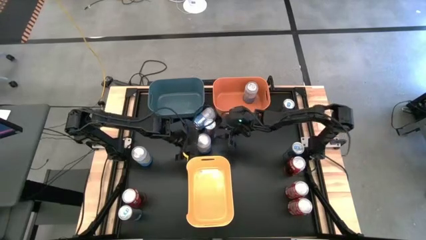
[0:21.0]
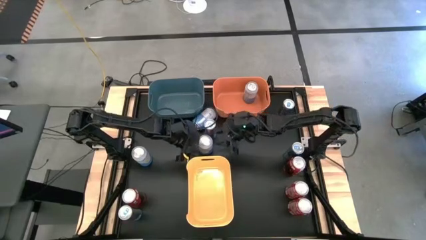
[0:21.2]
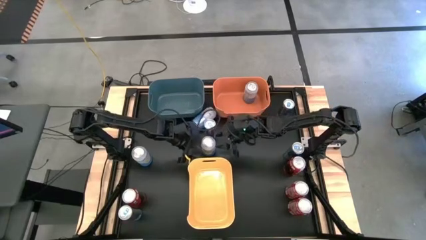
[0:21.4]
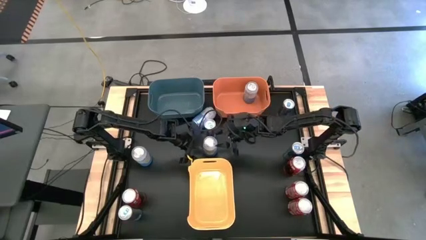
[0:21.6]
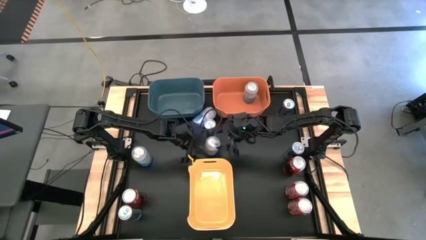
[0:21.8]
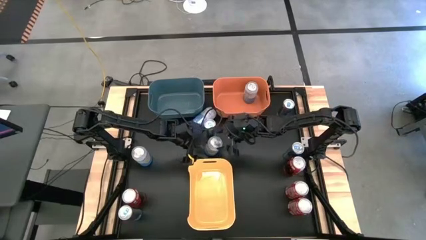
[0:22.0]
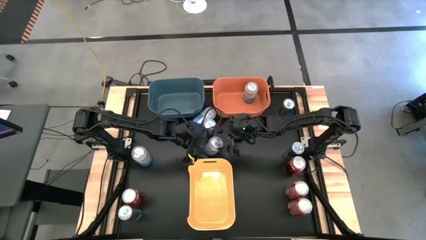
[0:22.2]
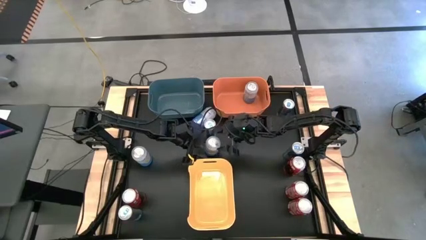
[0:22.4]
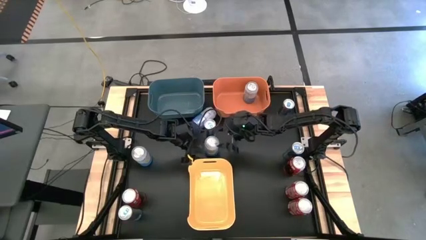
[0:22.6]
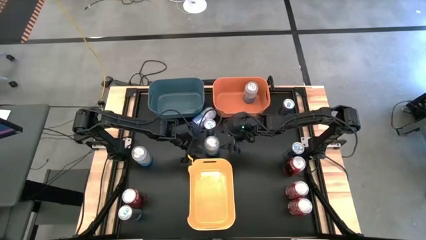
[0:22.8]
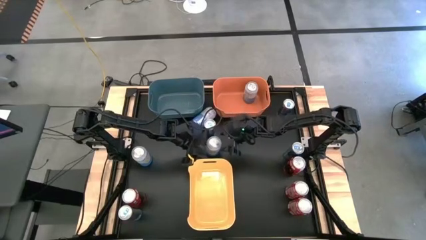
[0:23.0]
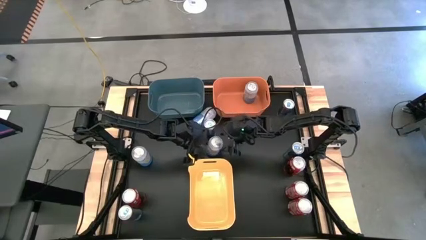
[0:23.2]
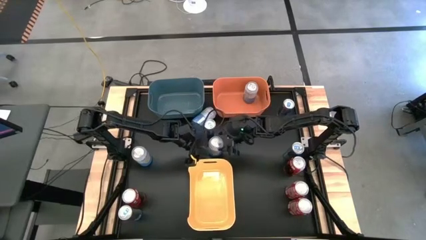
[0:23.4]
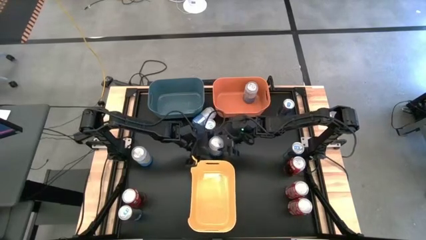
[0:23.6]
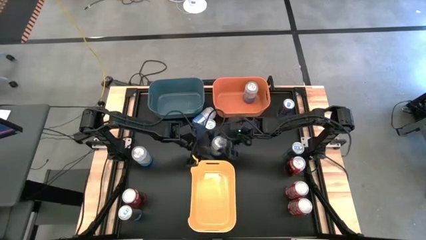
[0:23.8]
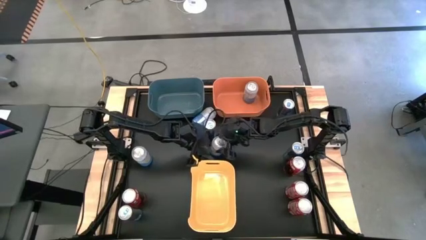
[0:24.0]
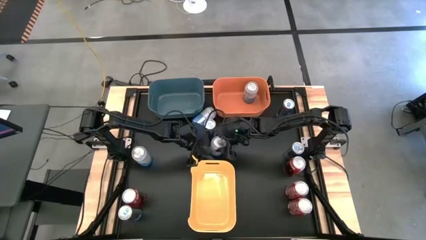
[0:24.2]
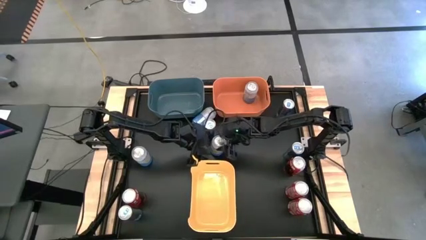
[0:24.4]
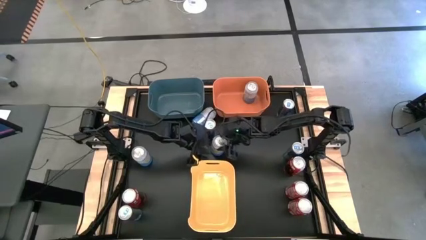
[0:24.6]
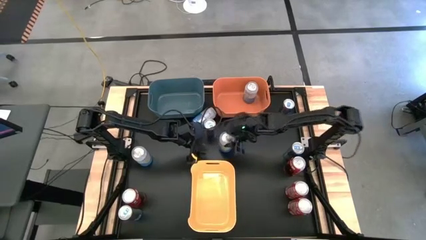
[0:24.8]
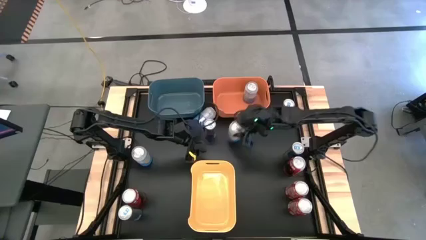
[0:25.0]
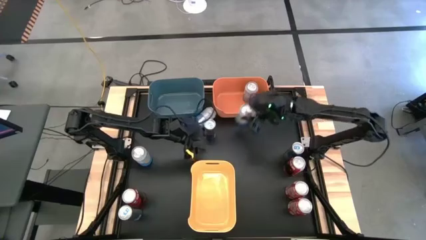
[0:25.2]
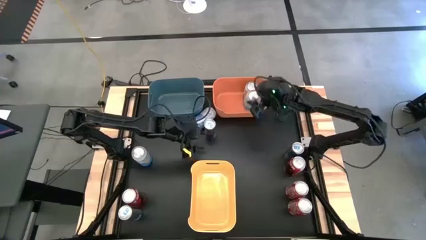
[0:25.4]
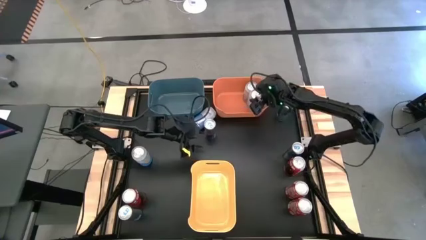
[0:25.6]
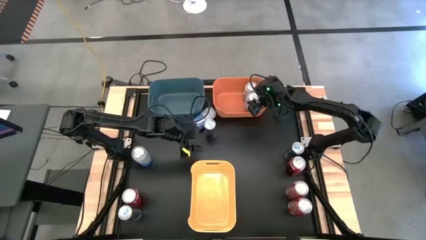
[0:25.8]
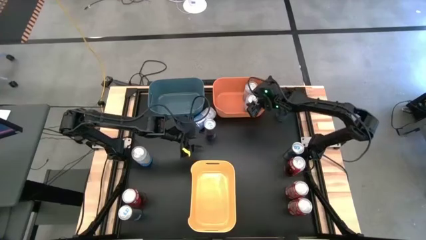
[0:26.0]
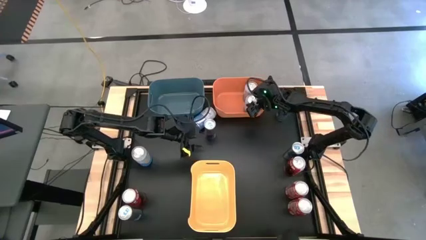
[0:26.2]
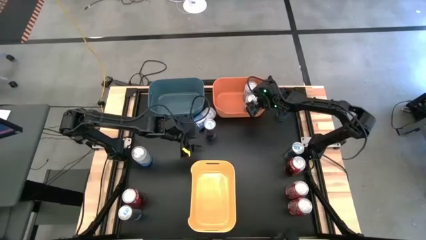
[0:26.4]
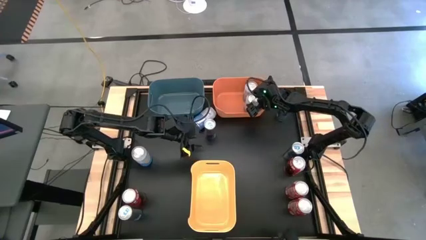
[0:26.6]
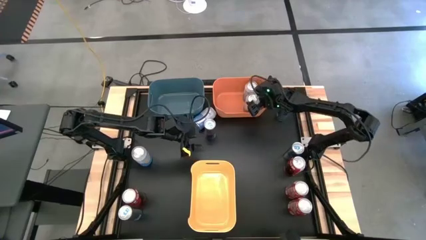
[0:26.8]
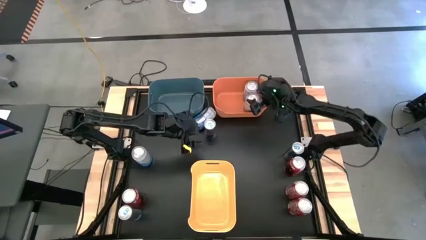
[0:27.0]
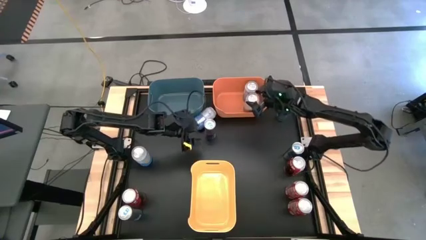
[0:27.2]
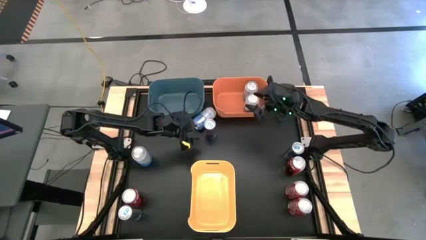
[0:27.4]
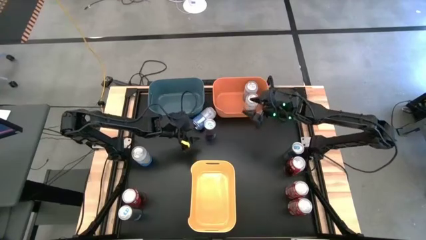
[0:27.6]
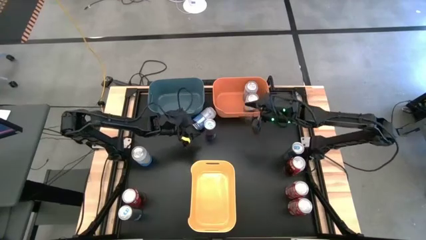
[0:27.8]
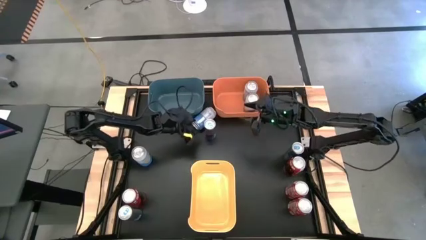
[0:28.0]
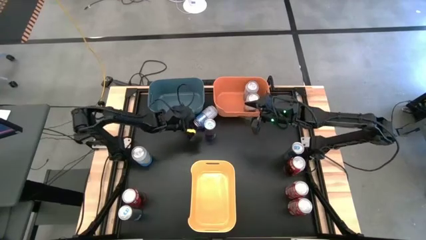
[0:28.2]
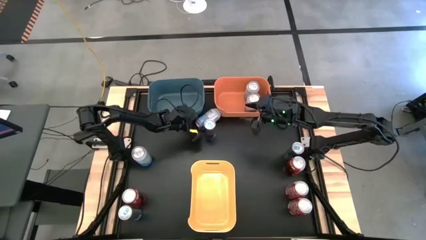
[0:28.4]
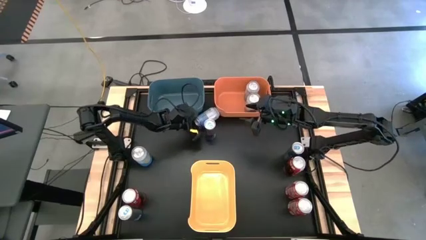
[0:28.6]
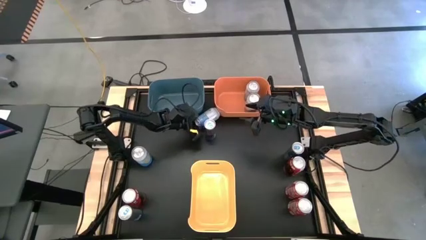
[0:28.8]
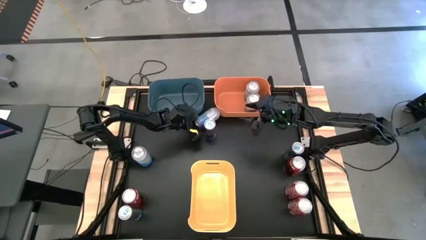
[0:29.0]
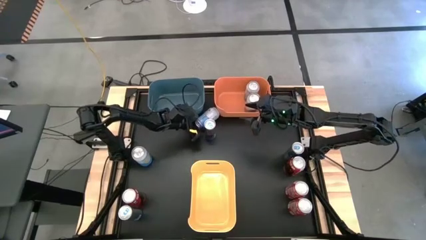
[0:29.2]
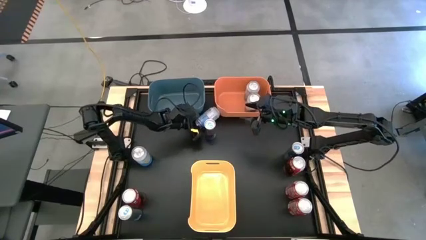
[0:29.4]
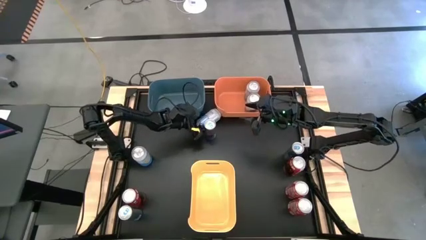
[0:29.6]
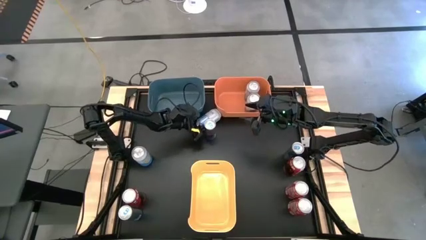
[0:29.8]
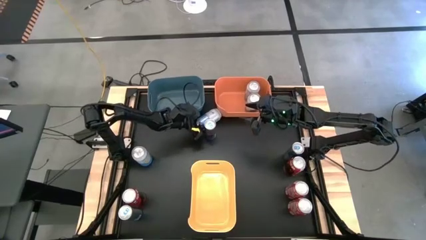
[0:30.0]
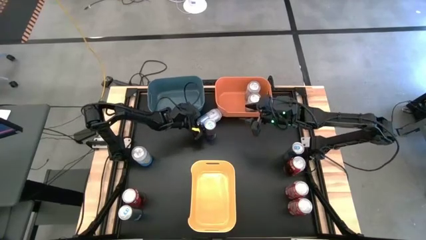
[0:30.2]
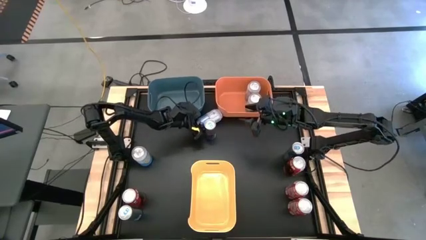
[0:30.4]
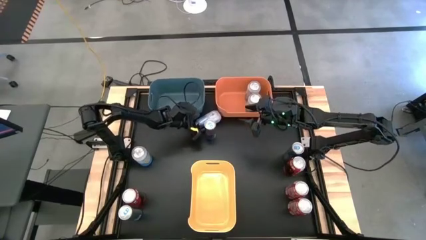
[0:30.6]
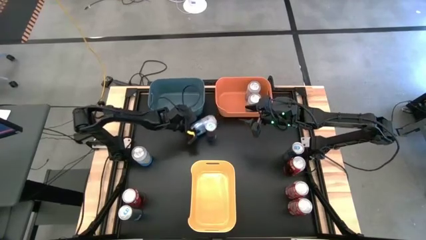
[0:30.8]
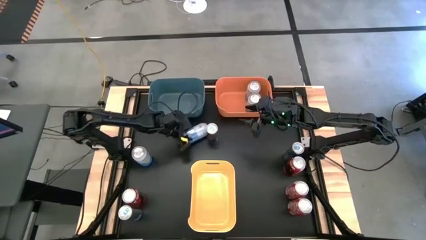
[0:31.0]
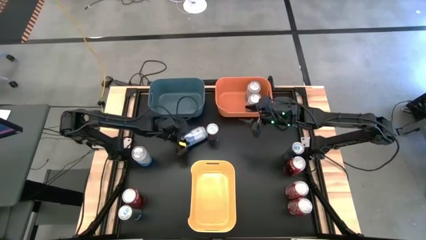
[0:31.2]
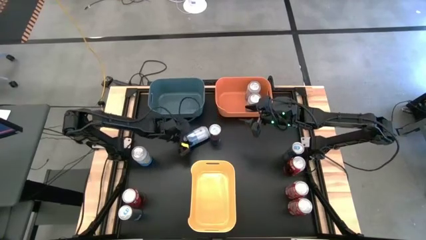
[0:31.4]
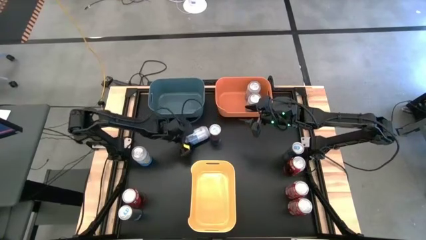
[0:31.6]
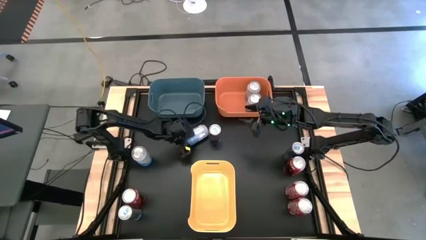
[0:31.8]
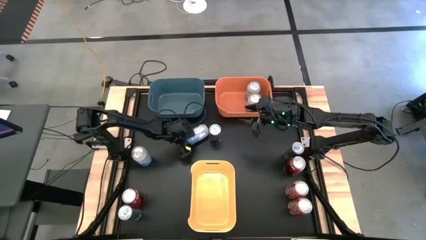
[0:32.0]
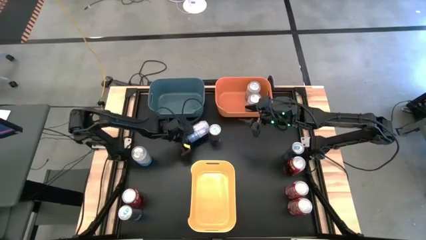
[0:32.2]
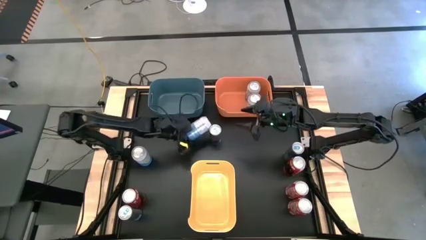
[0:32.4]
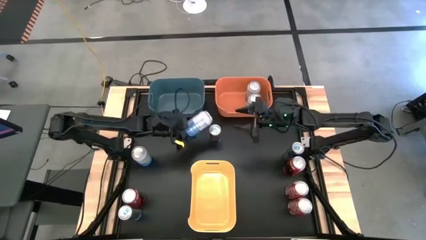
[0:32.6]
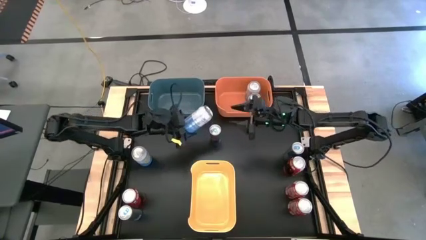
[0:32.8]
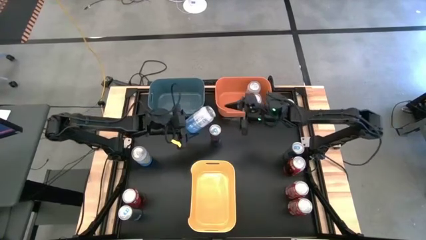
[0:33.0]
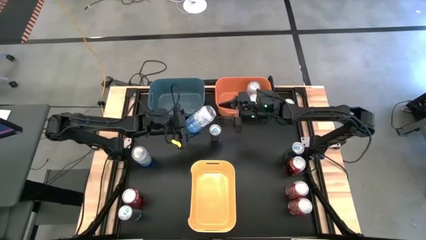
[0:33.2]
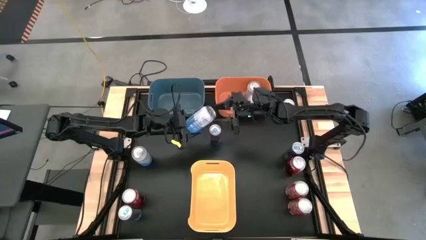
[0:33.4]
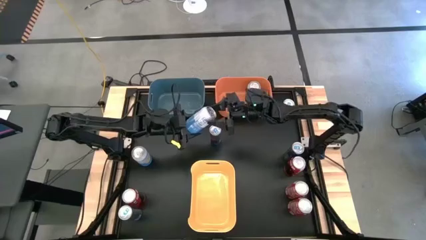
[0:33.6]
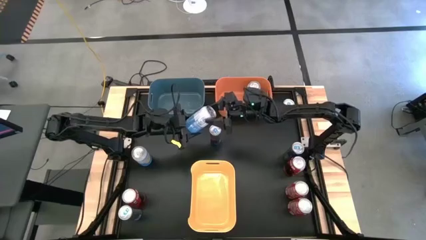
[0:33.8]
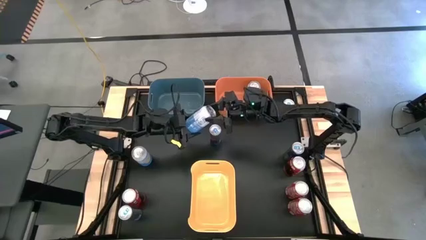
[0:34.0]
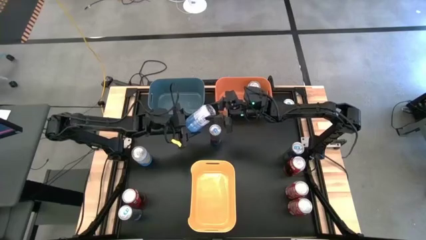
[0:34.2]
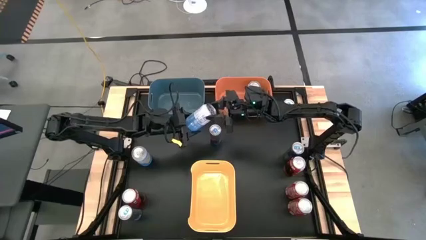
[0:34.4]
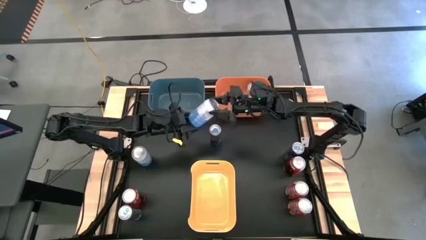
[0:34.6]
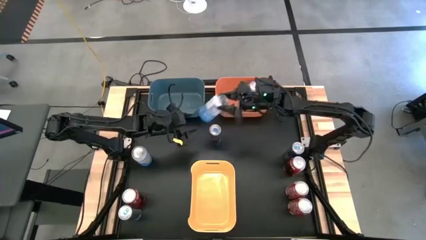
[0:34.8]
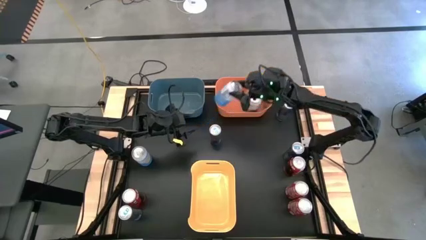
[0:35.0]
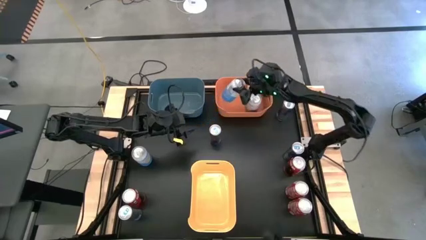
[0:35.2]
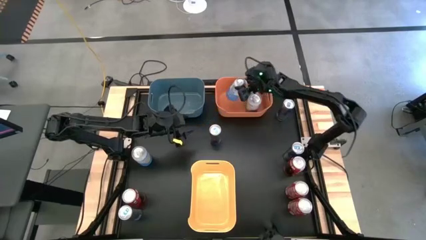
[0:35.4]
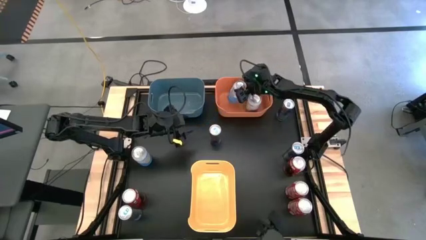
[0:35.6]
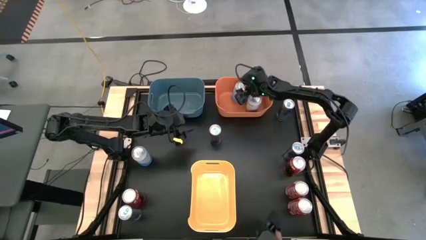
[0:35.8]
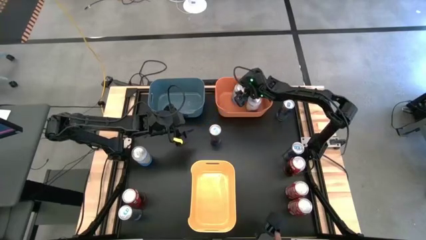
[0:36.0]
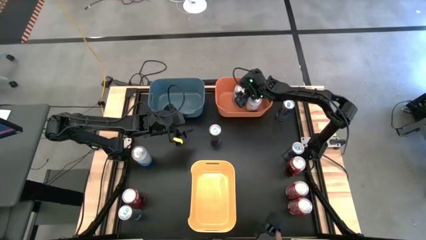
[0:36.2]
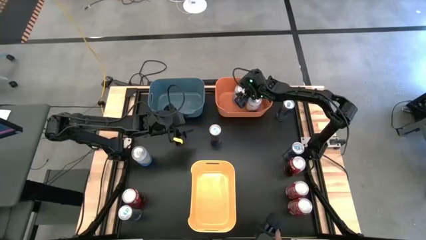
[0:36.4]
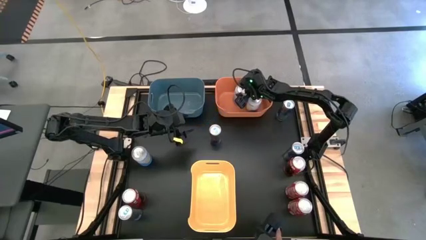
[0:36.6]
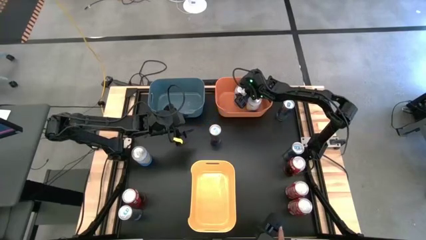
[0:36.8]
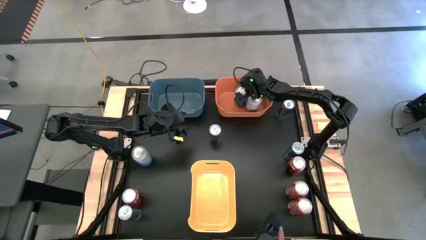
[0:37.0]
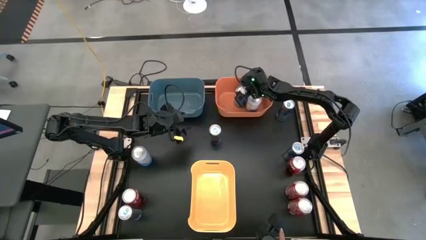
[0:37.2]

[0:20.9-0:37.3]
Task: Sort soda cans
Put the blue white soda can into the orange bin
